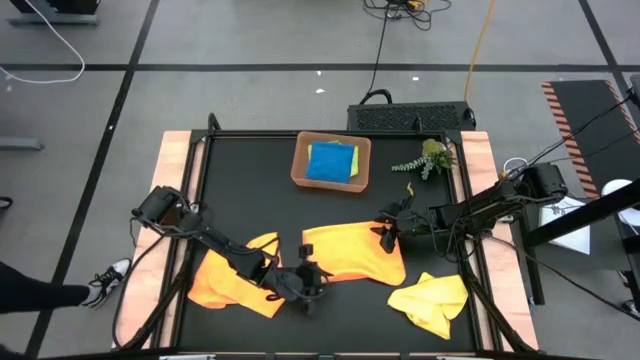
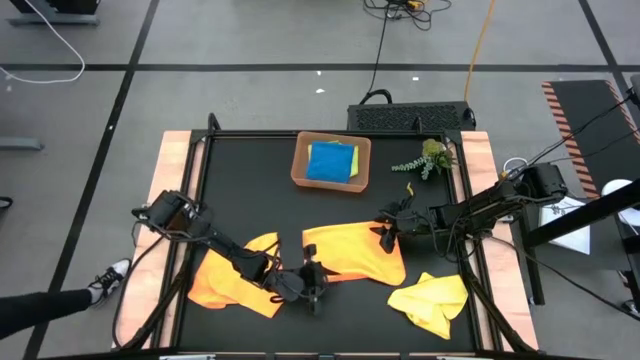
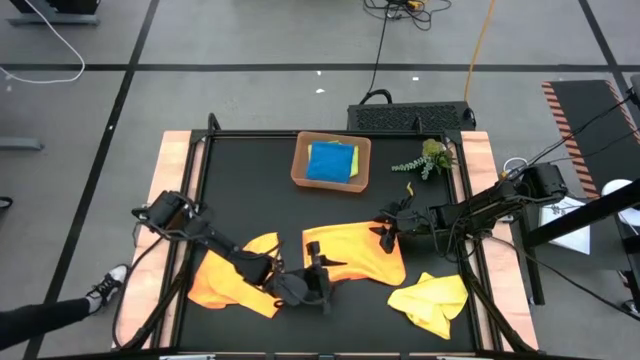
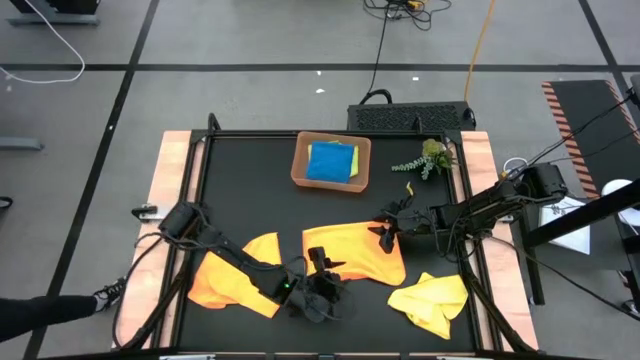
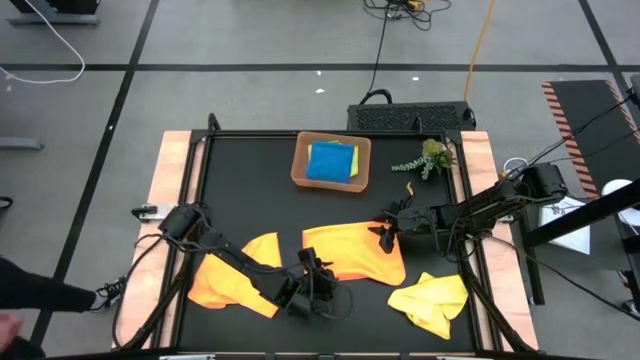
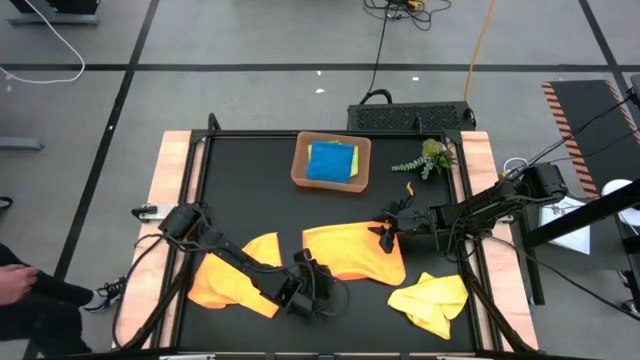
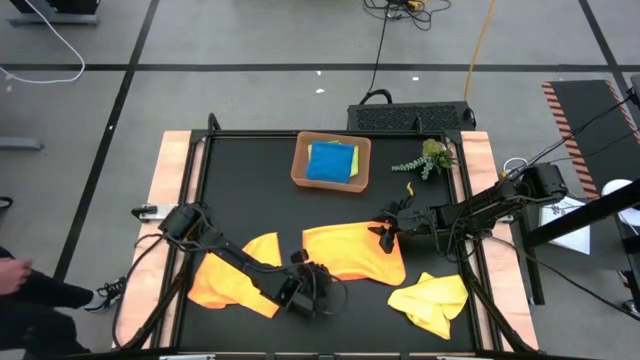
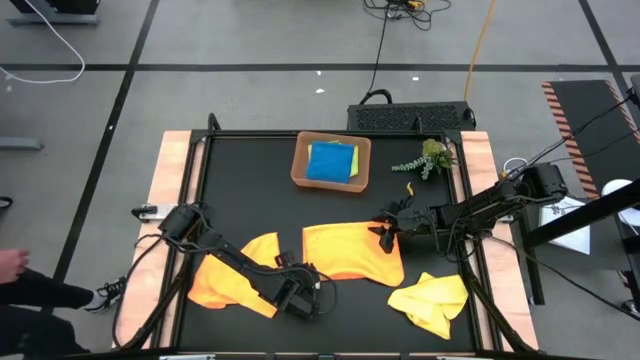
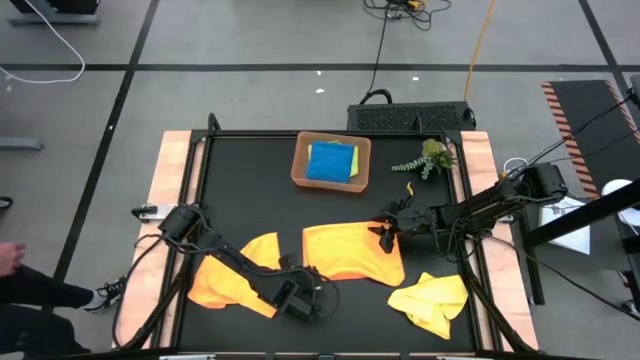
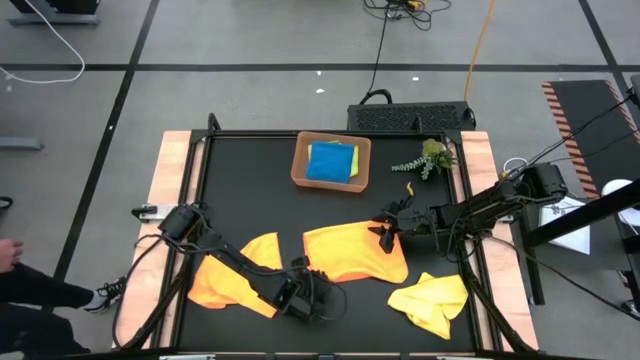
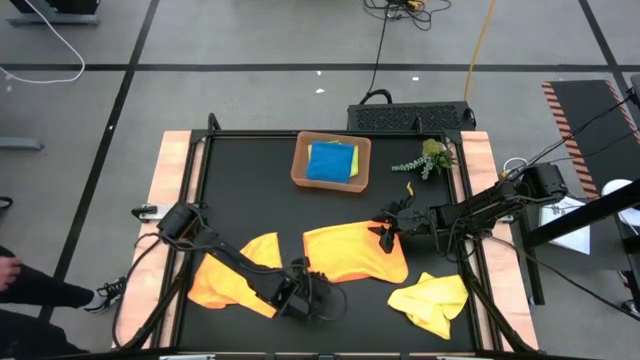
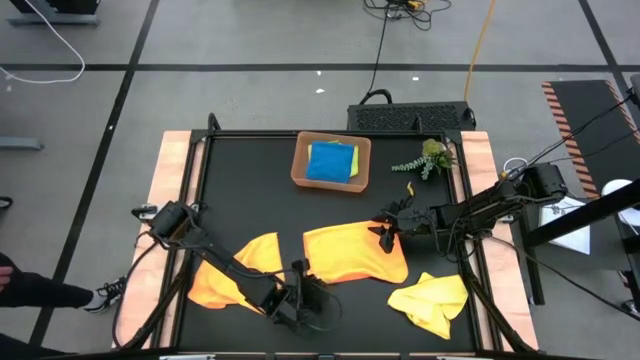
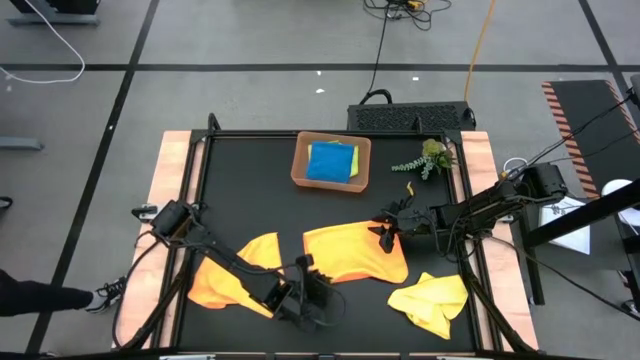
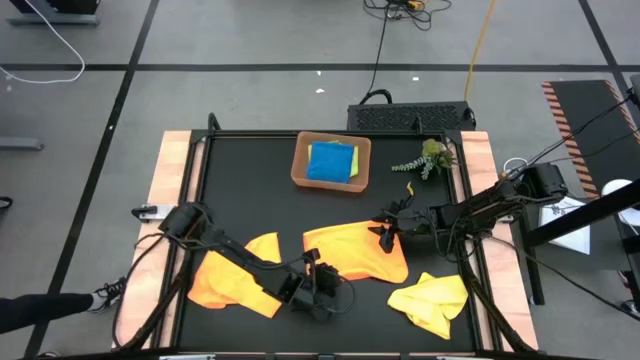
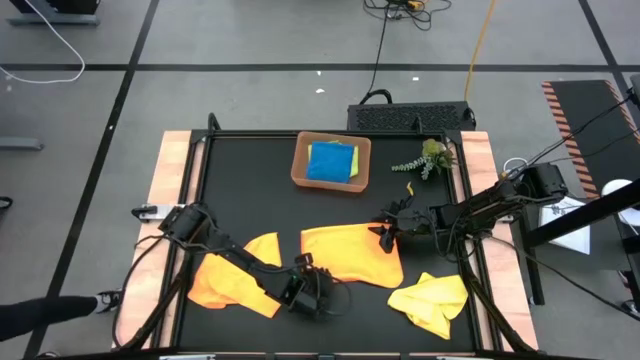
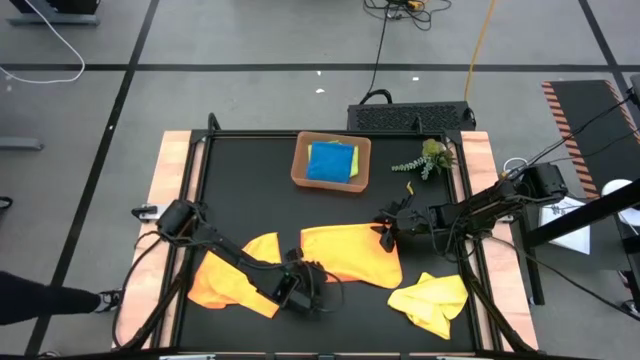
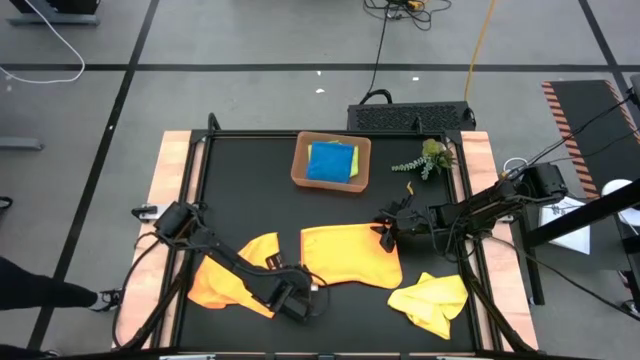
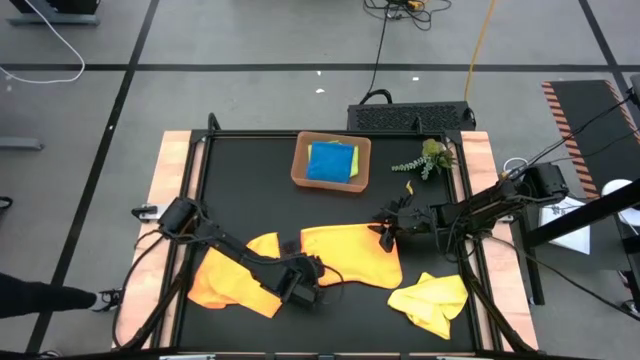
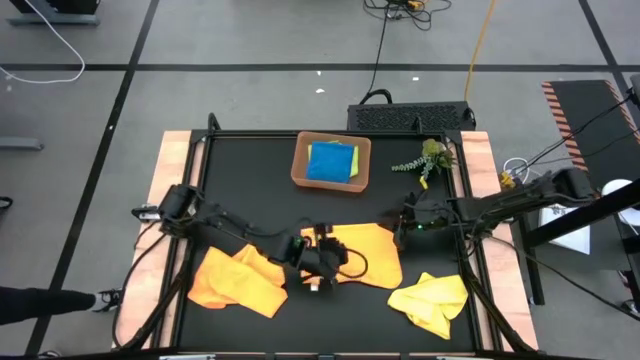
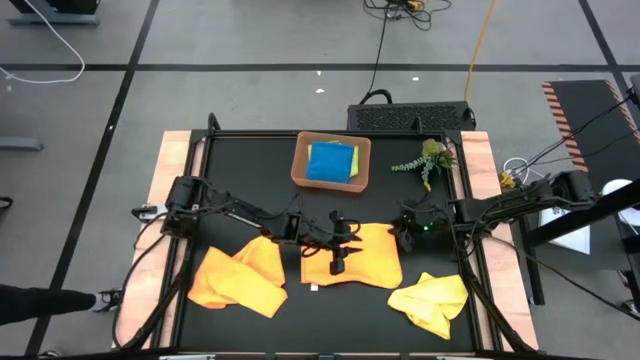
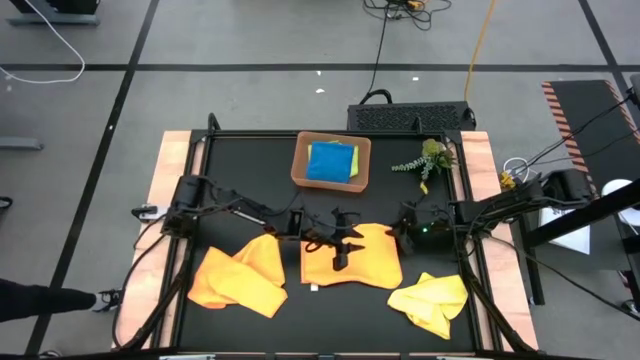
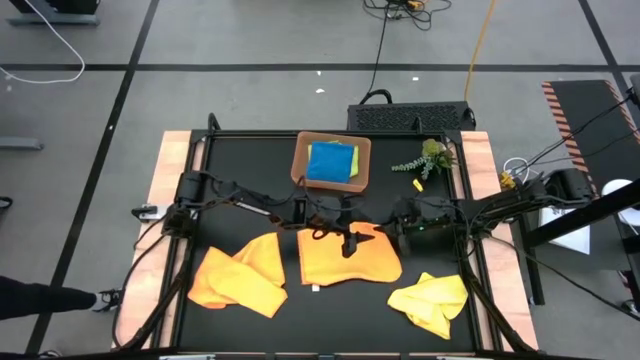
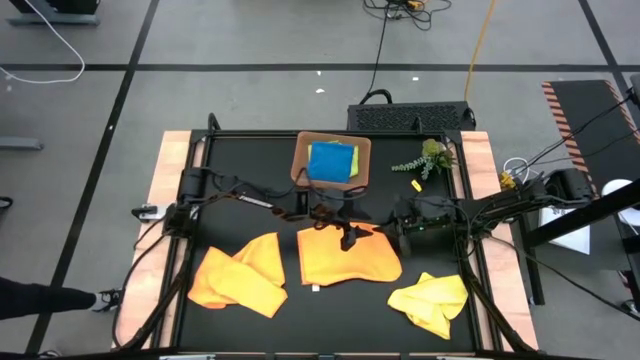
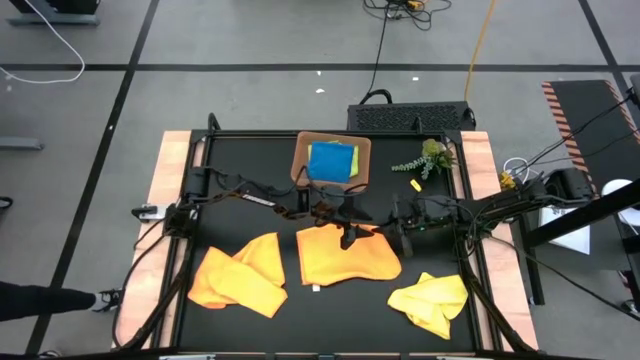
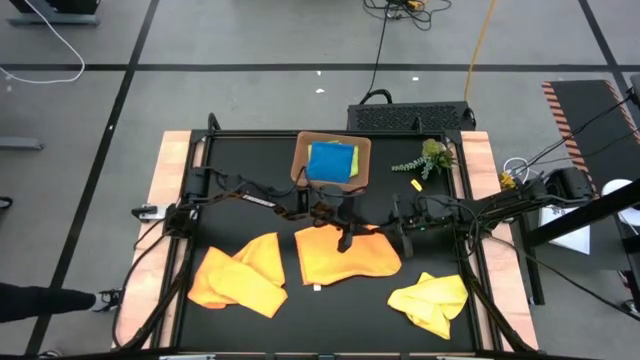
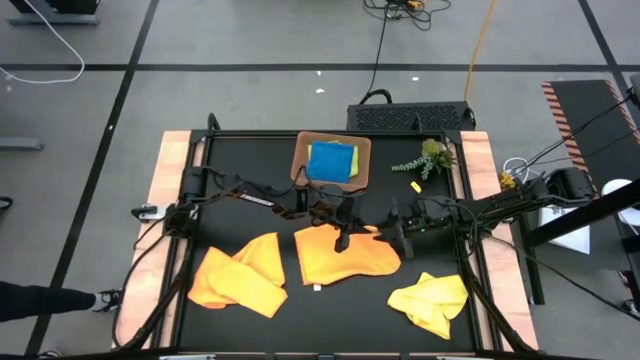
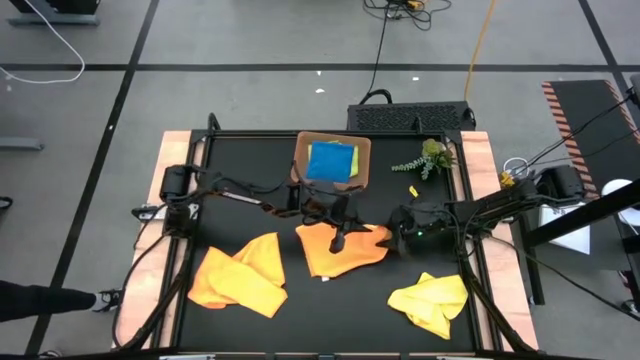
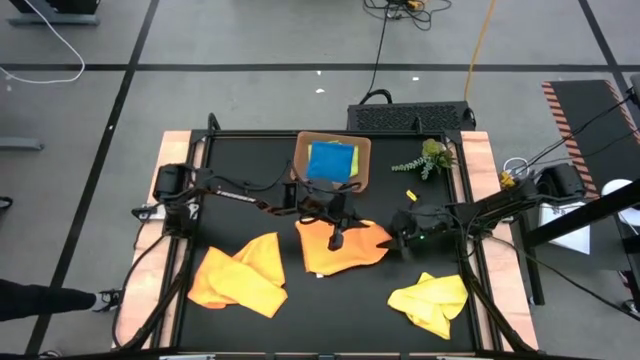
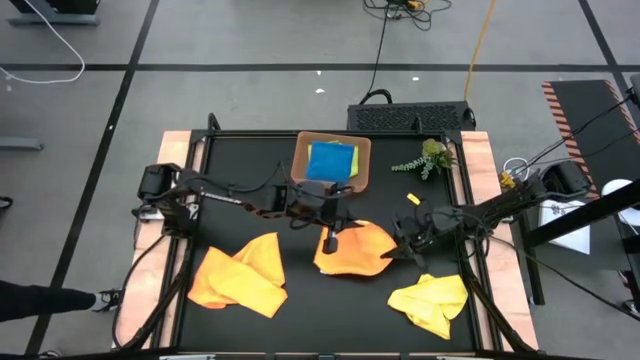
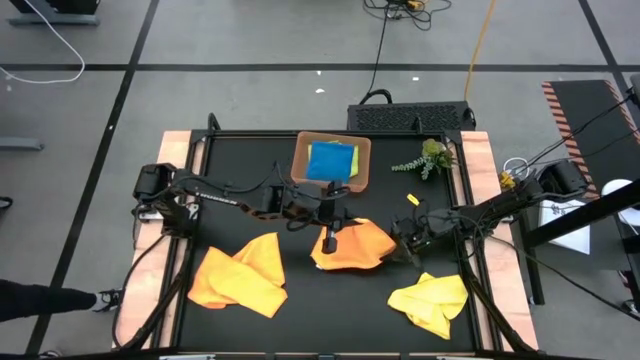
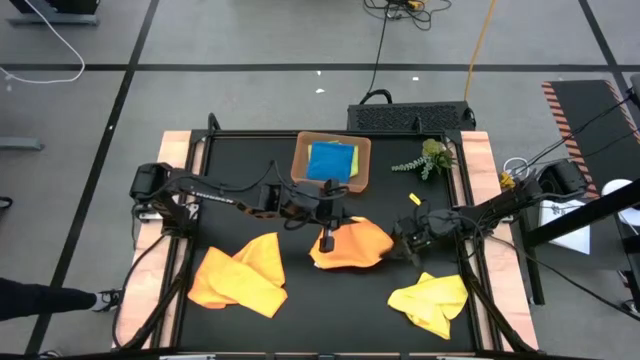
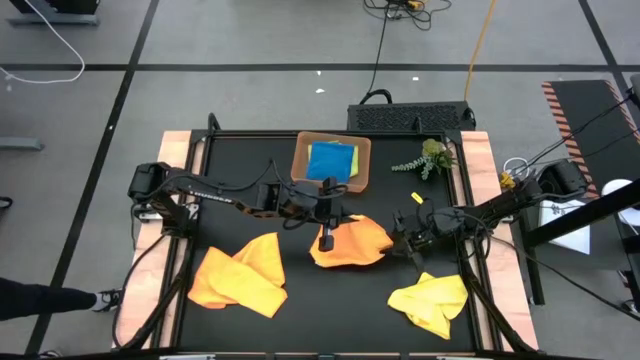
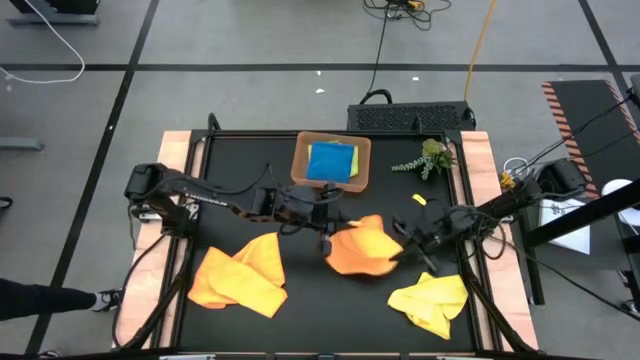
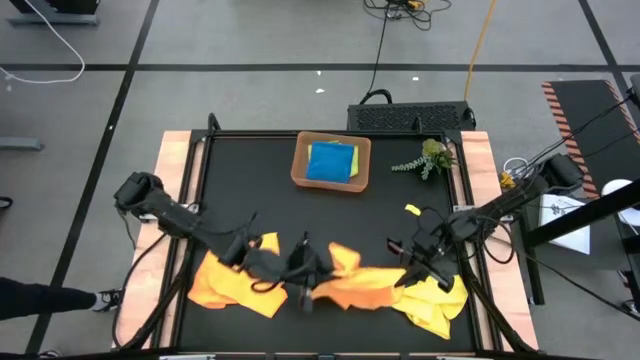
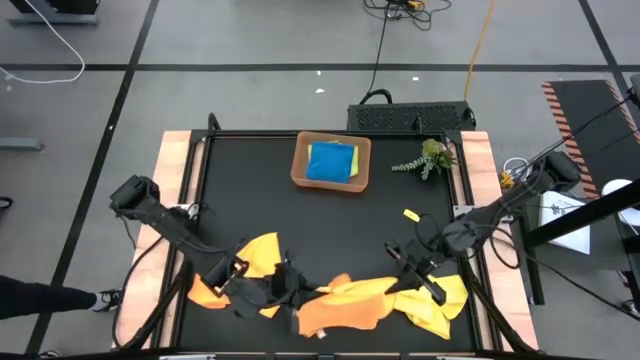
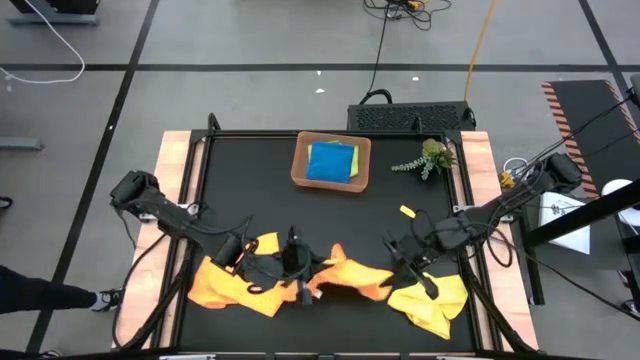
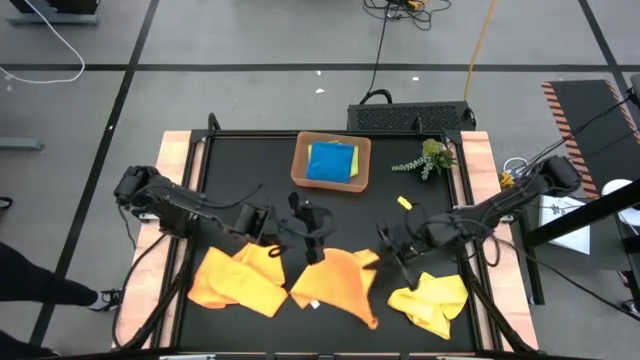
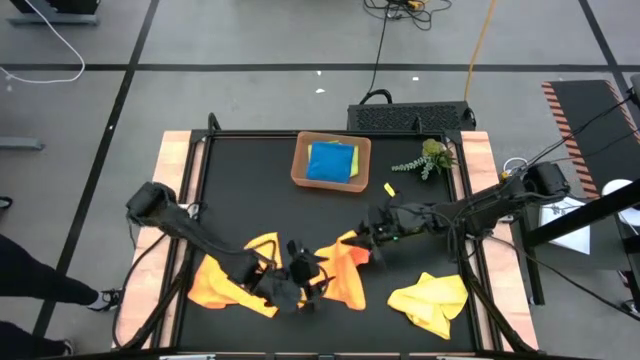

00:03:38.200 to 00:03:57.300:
Task: Fold microfiber towels
Fold the orange microfiber towel
